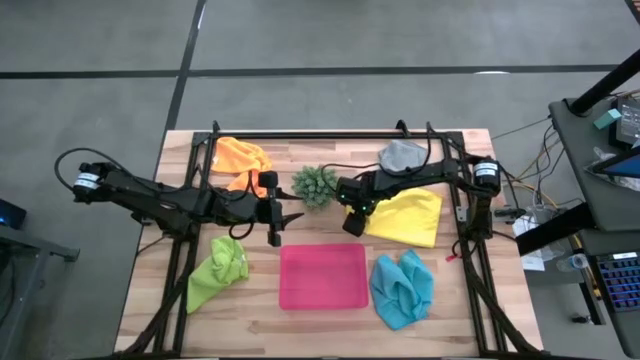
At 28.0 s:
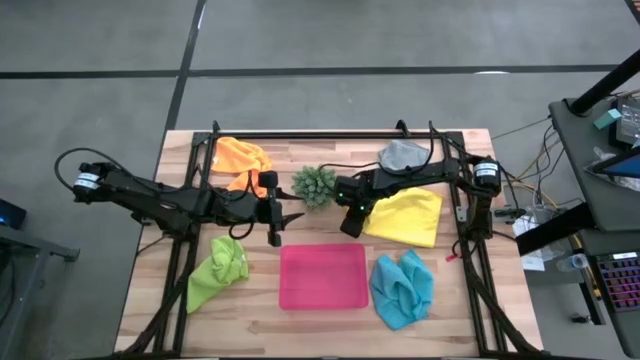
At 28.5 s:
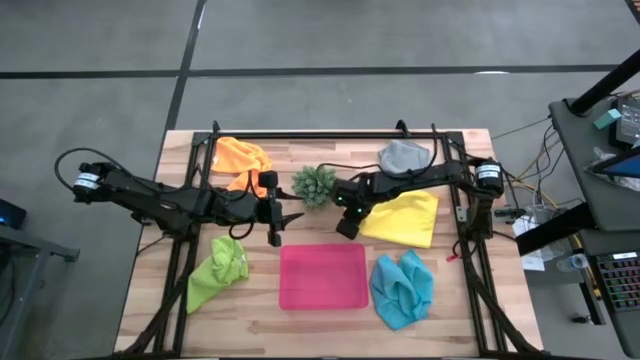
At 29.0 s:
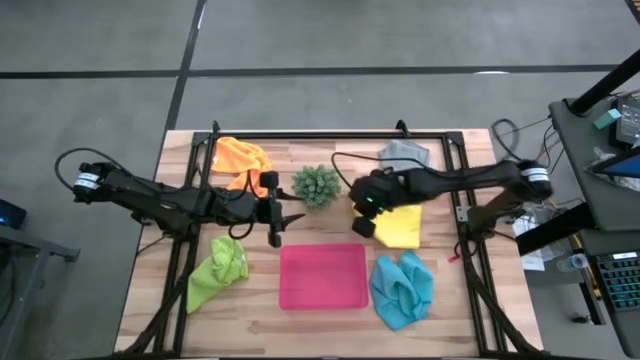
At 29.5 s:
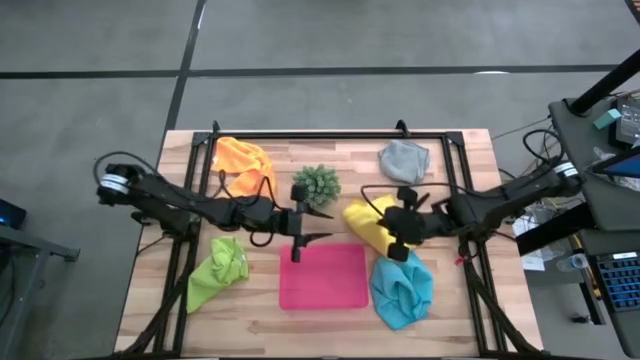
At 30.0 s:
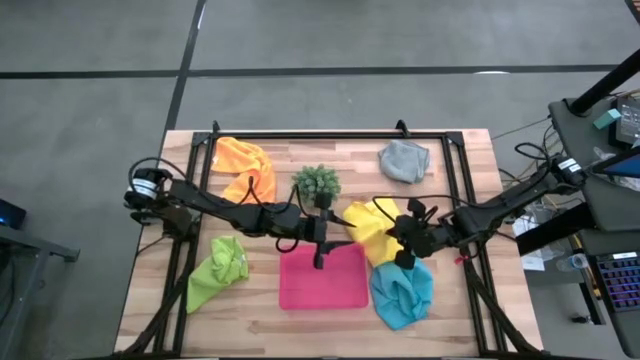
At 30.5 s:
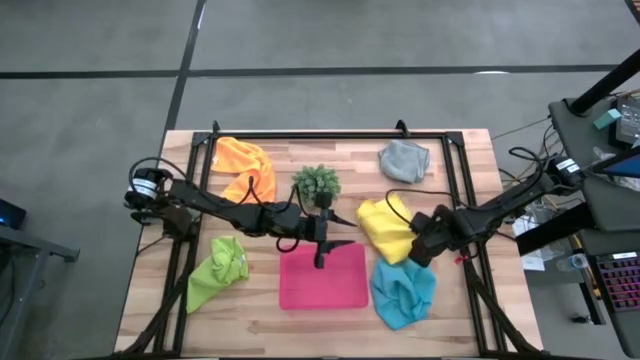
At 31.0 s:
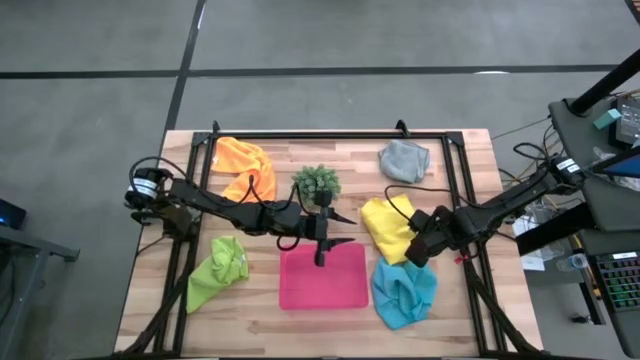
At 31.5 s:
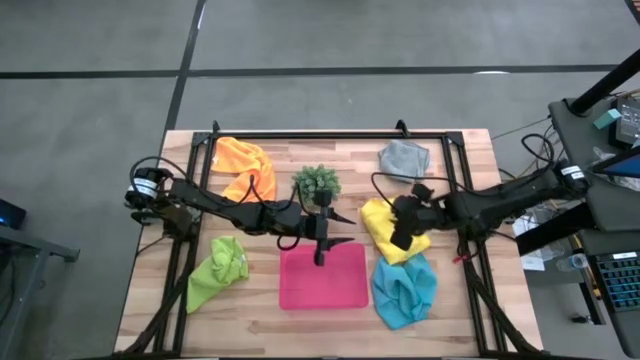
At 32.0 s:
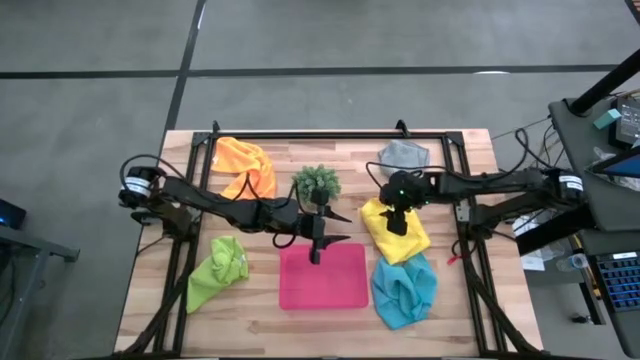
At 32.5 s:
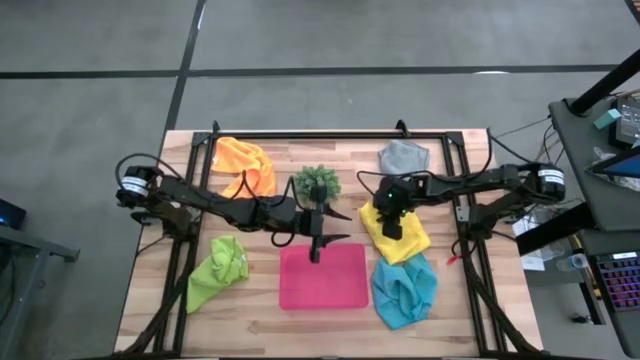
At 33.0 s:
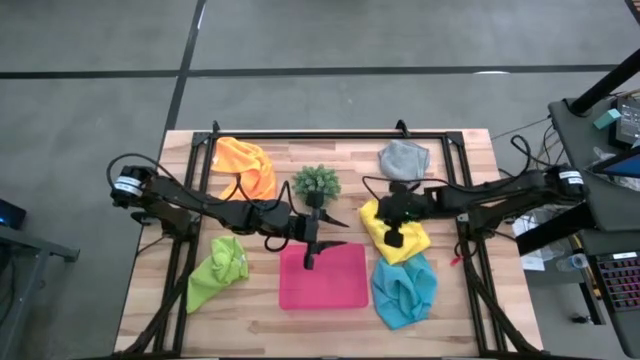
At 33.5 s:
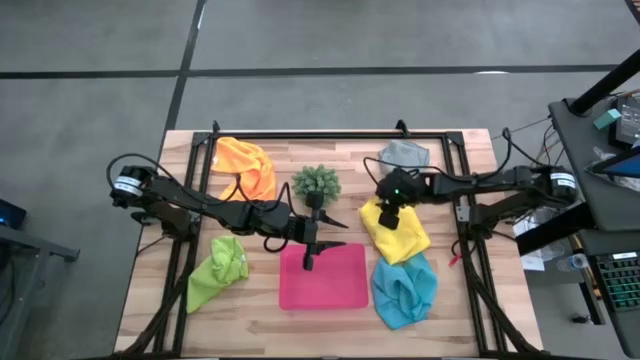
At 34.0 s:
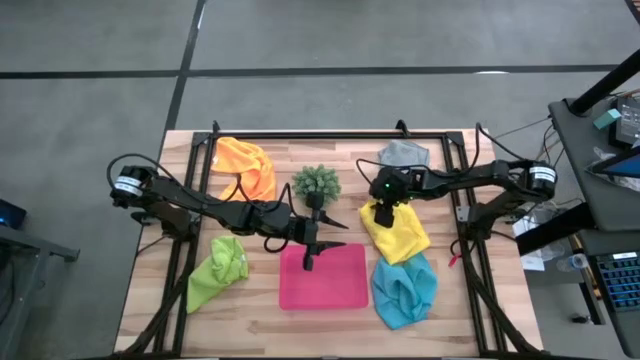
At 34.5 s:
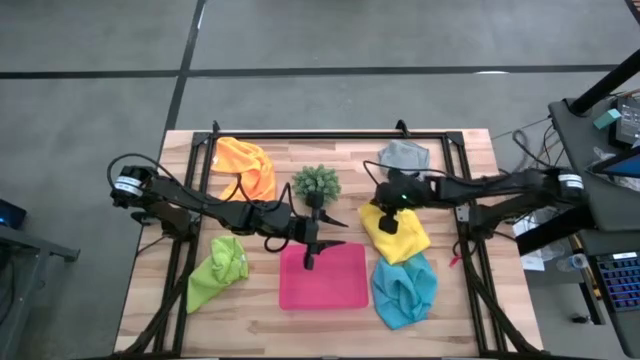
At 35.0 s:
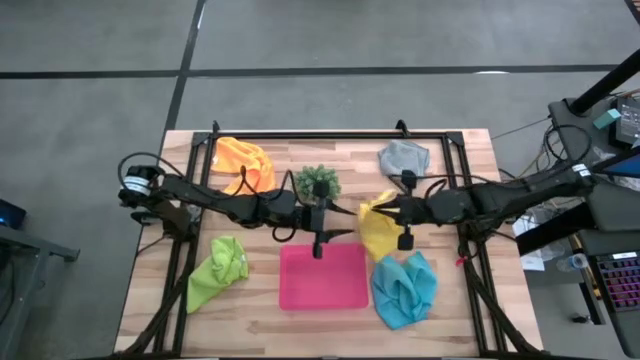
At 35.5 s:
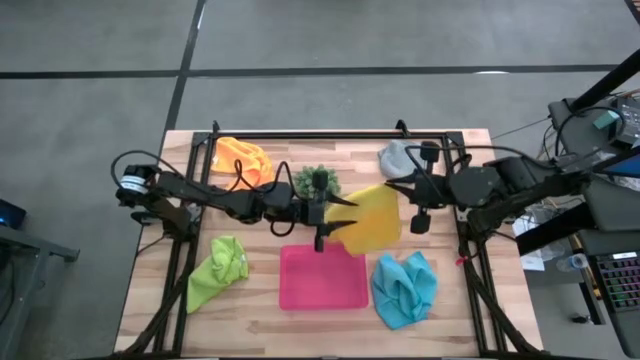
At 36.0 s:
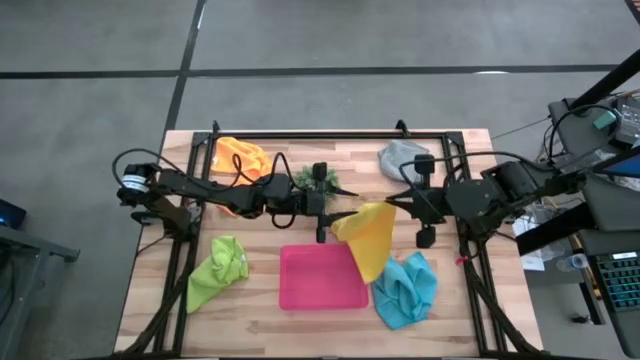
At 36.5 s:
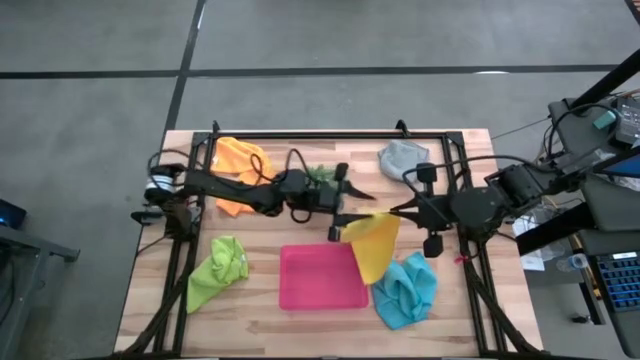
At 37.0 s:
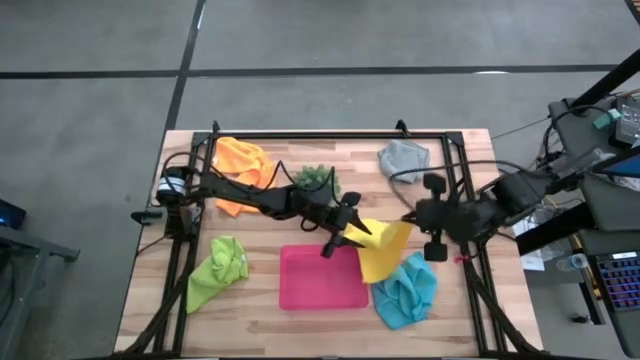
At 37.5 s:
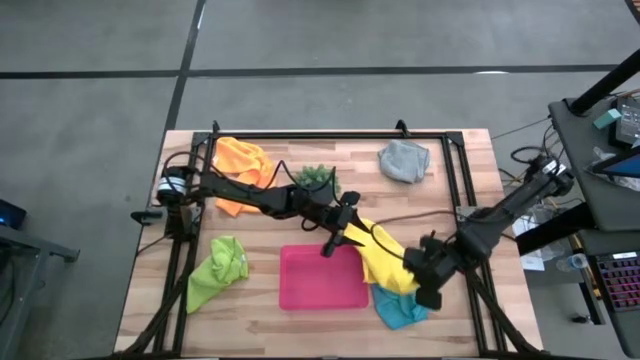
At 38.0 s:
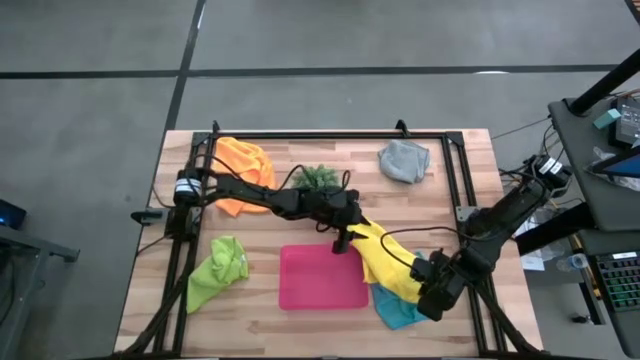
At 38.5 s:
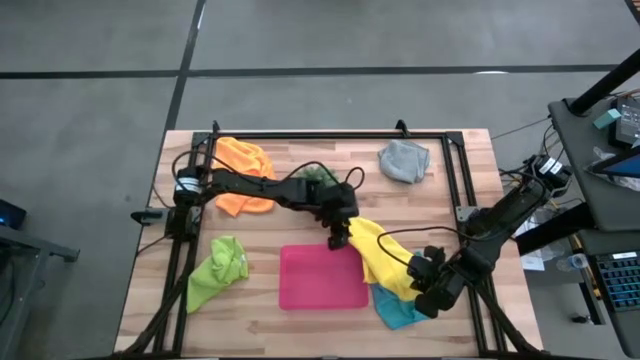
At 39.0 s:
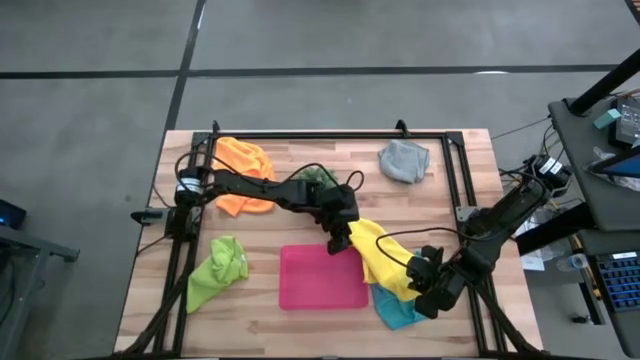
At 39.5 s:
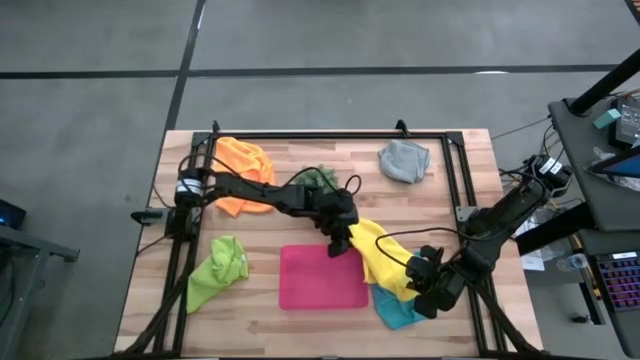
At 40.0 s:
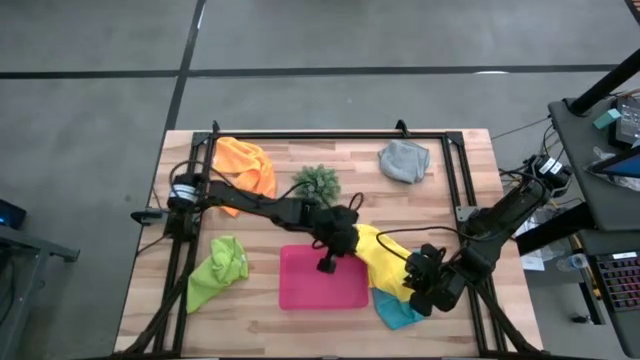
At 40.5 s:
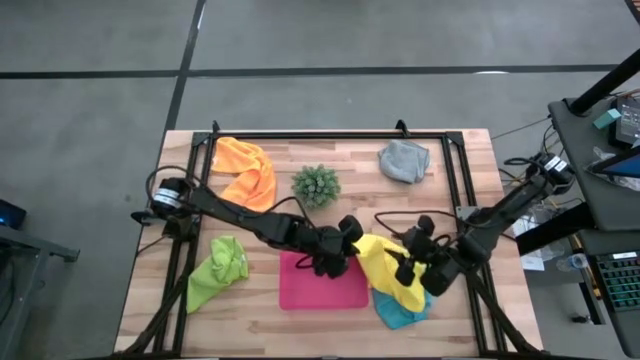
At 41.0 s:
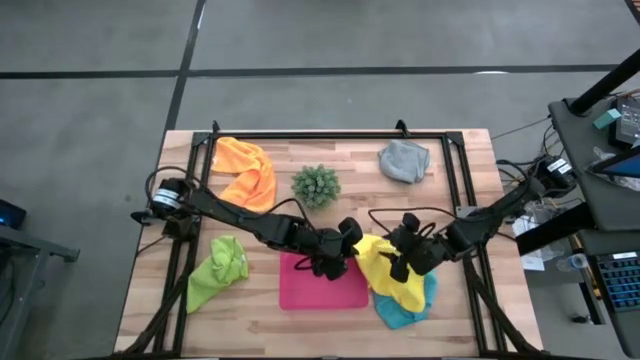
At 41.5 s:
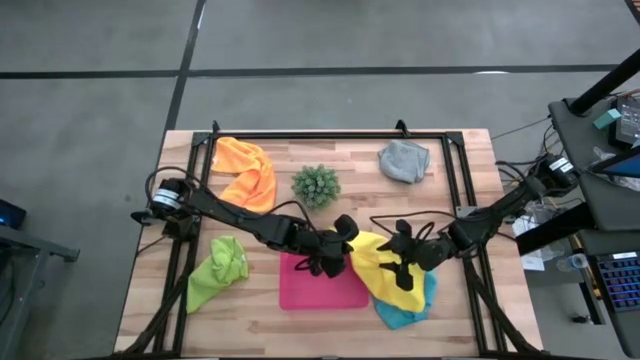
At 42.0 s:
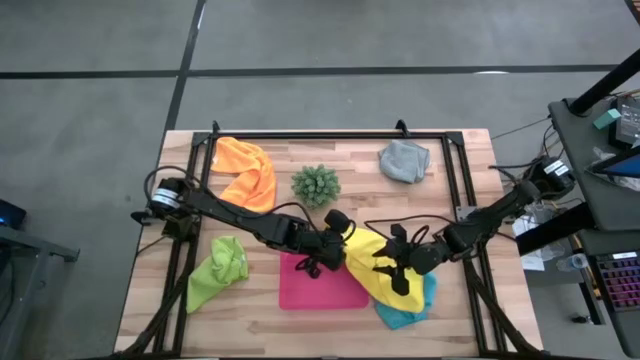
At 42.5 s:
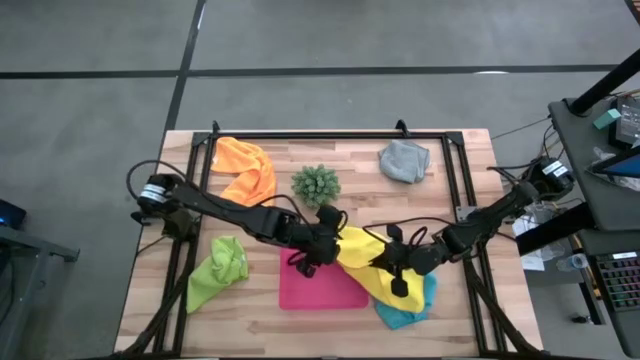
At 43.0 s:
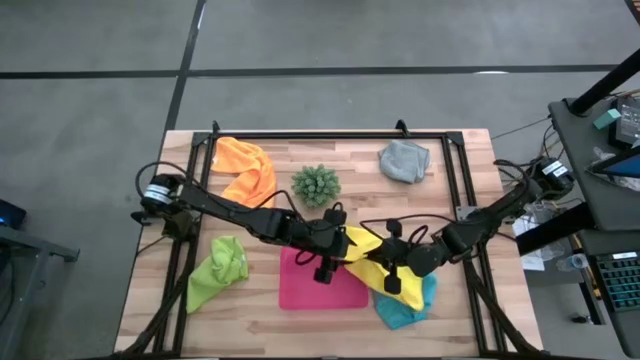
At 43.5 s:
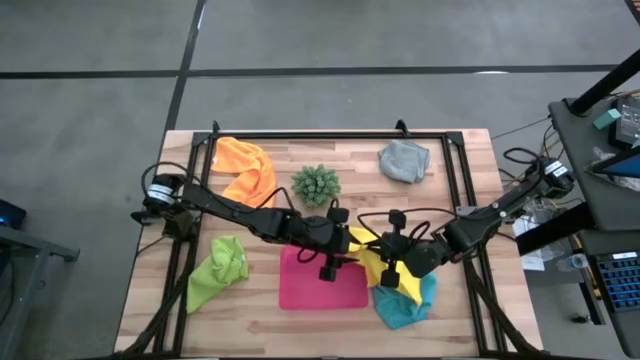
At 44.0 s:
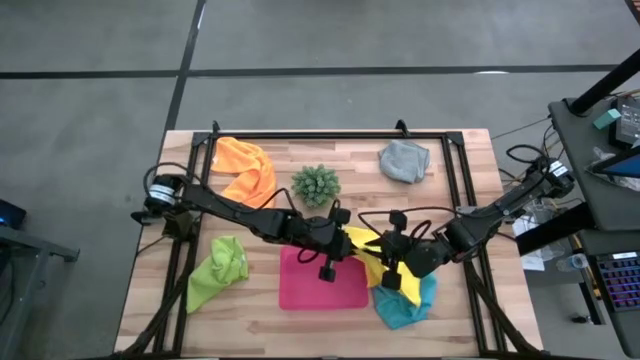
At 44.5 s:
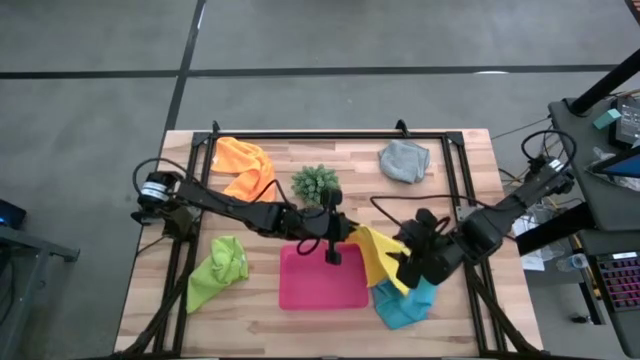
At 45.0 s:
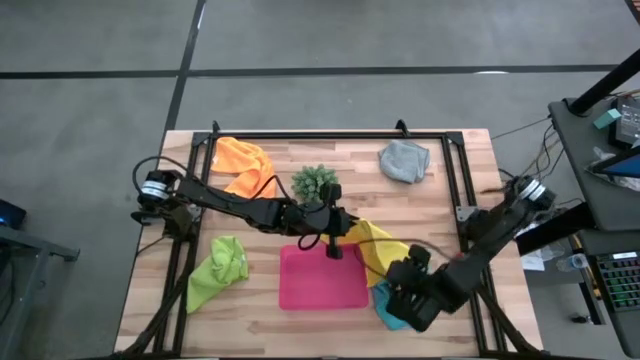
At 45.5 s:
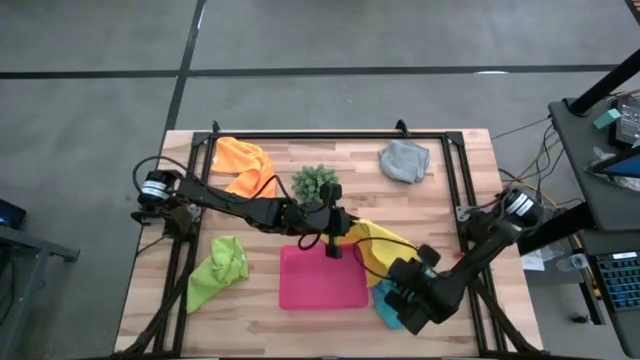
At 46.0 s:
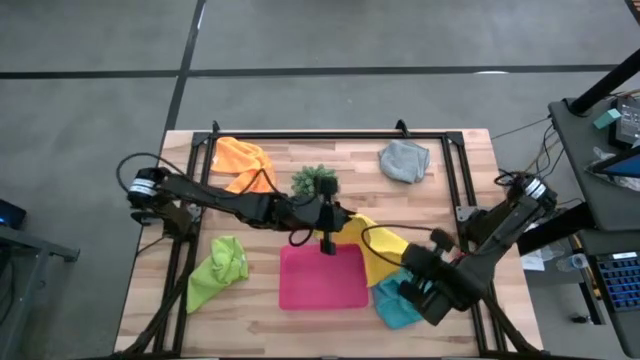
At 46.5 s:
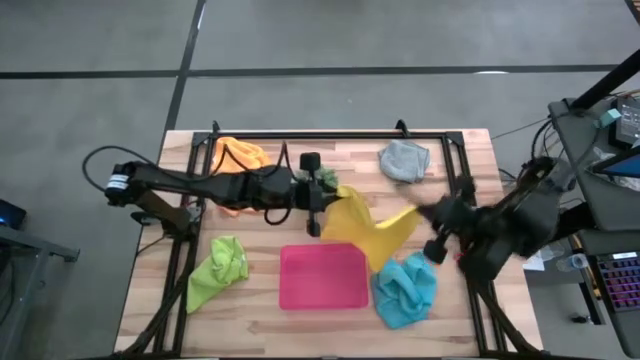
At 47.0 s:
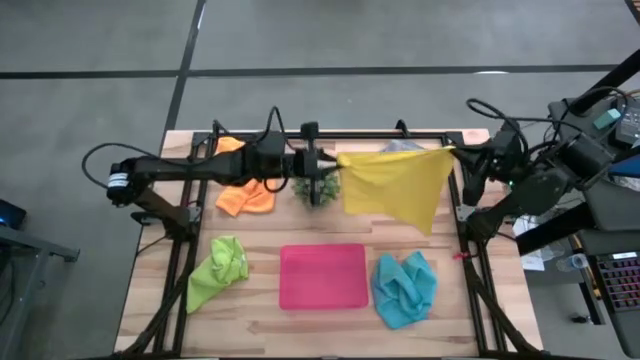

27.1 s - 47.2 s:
Task: Fold microfiber towels
Fold the yellow microfiber cloth
